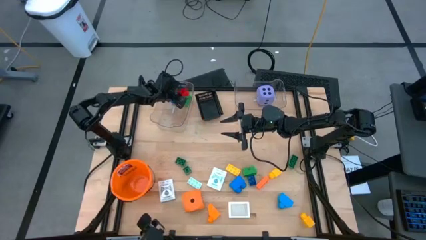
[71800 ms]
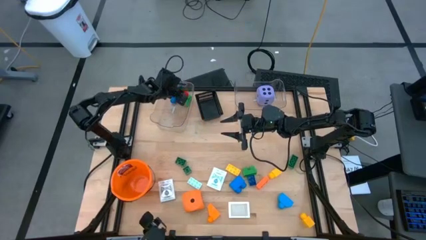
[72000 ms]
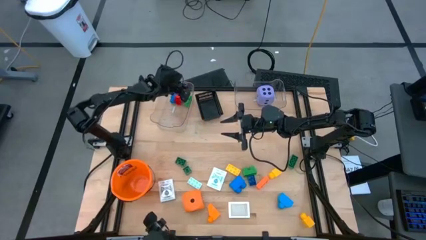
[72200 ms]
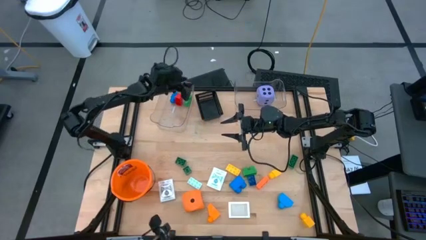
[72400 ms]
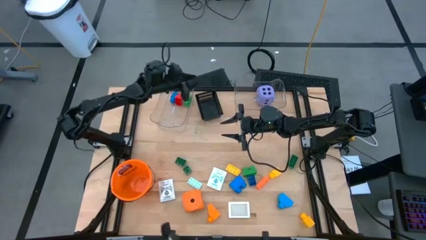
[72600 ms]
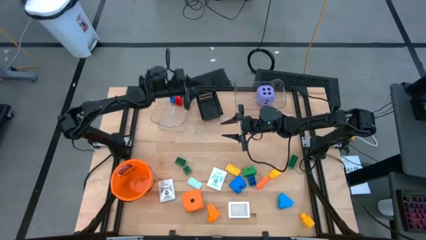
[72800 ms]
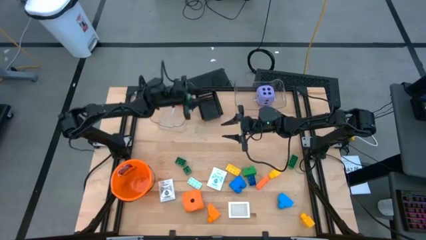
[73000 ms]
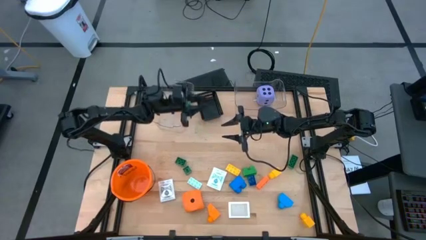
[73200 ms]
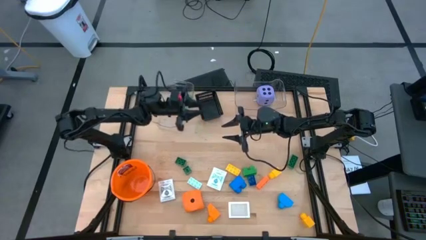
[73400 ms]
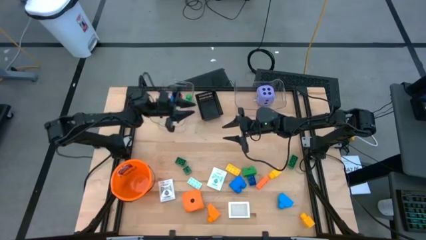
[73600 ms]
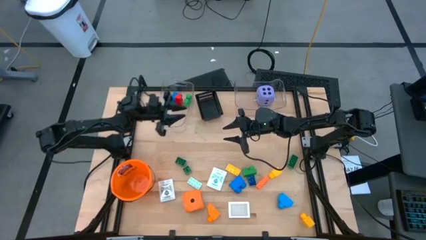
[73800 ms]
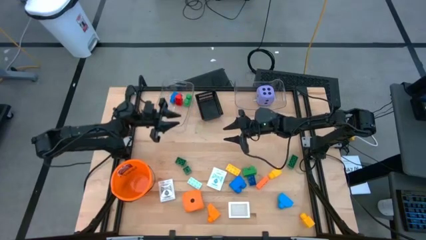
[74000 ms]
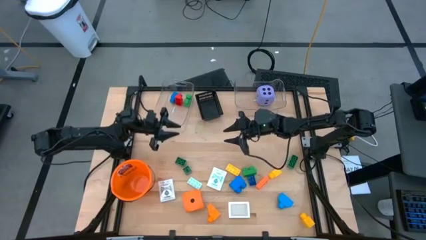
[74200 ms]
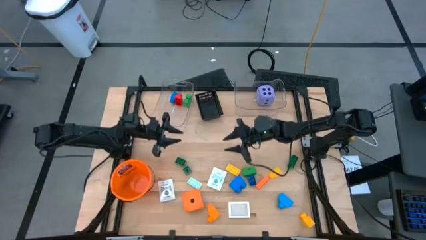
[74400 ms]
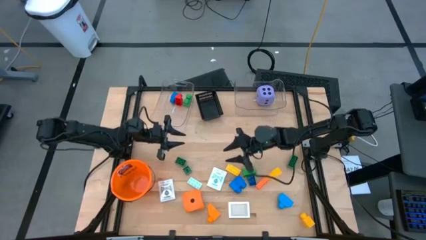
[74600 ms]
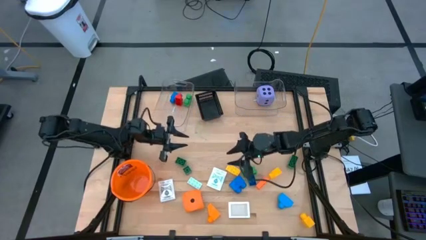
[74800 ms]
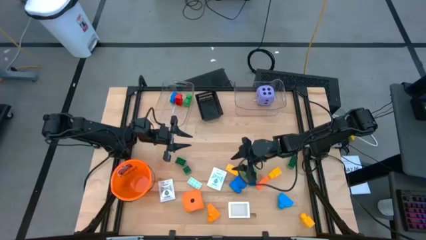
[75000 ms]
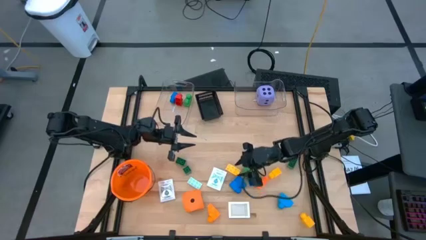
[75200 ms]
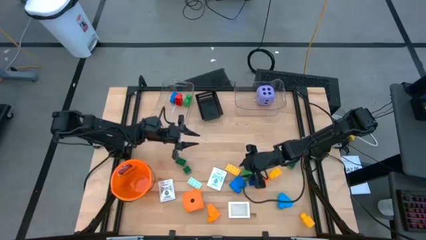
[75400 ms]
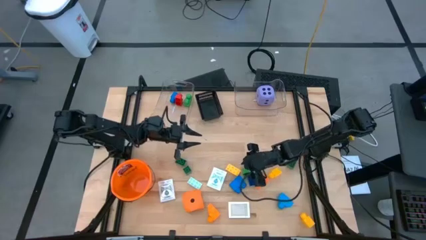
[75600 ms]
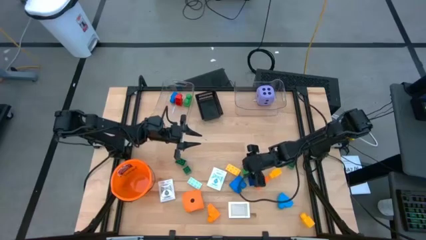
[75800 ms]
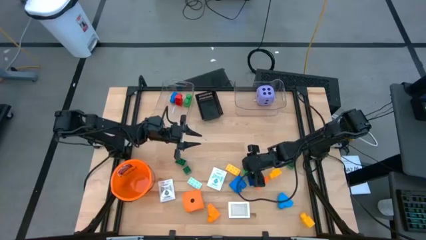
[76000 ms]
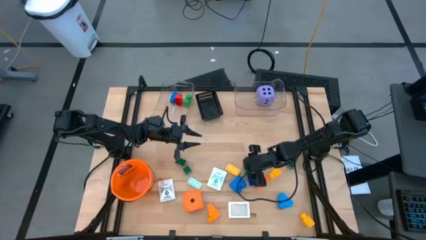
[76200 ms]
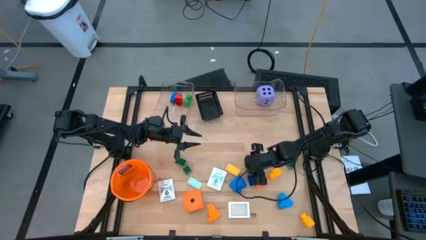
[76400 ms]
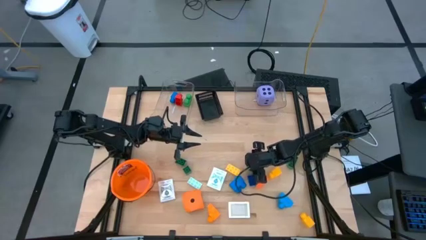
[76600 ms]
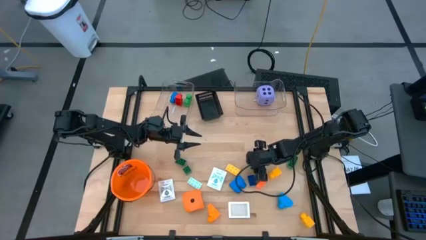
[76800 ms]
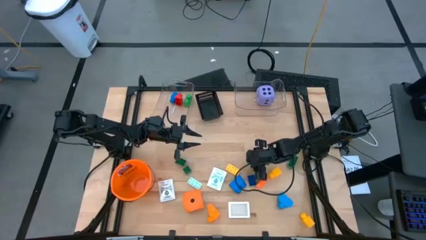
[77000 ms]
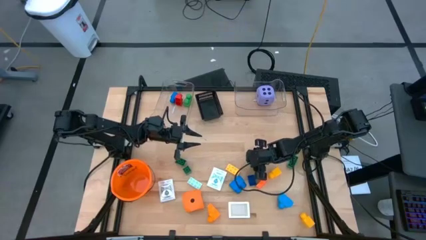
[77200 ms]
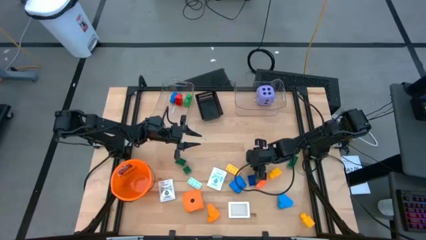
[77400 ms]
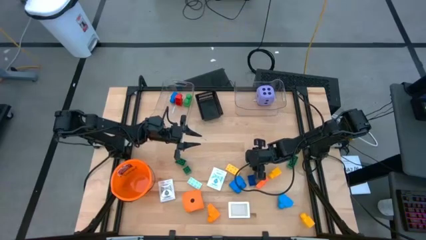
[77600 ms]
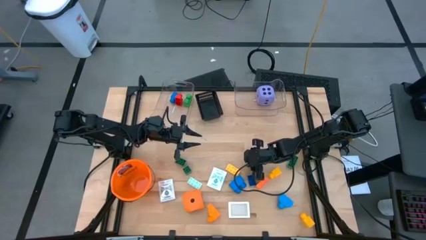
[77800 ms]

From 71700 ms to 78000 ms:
Task: Pick & Place Toys
Put the green gamepiece into the left transparent bin

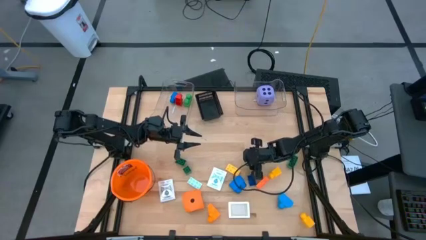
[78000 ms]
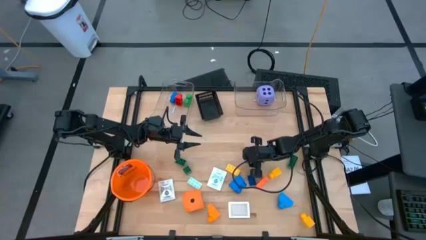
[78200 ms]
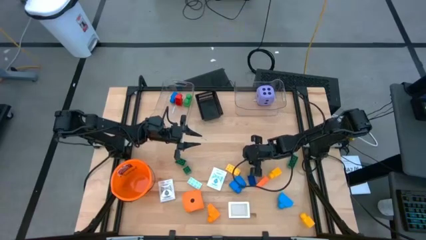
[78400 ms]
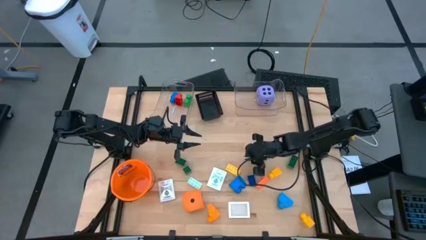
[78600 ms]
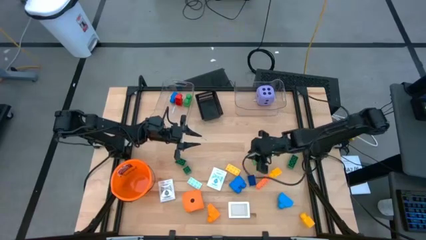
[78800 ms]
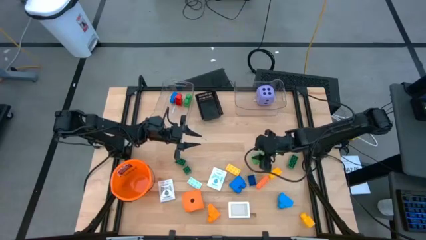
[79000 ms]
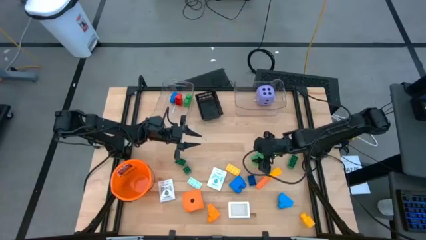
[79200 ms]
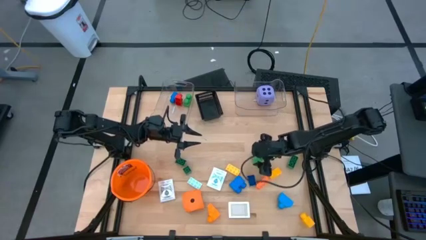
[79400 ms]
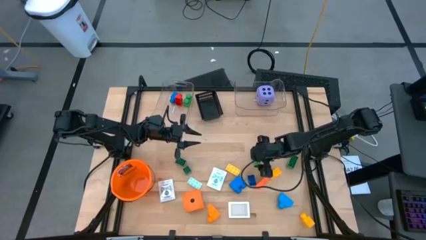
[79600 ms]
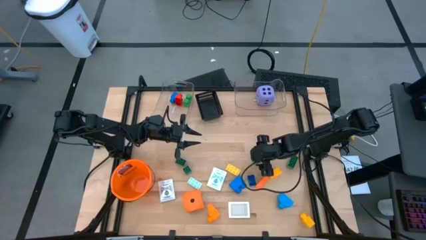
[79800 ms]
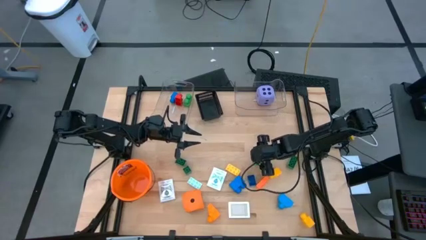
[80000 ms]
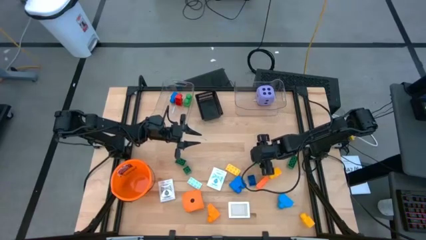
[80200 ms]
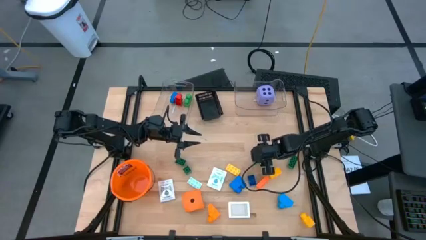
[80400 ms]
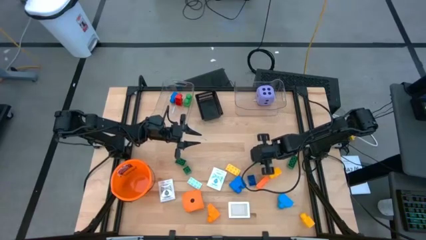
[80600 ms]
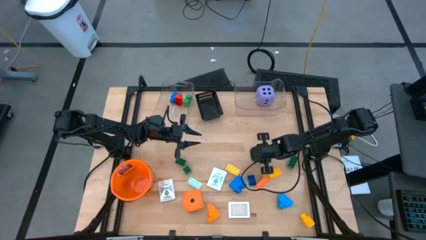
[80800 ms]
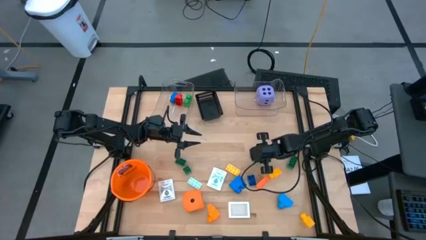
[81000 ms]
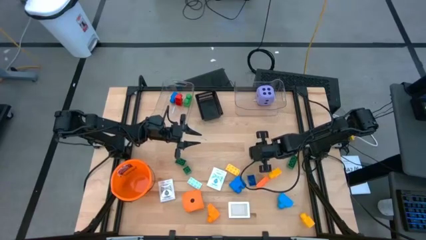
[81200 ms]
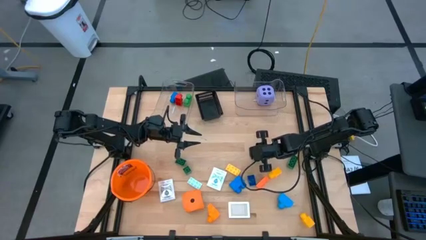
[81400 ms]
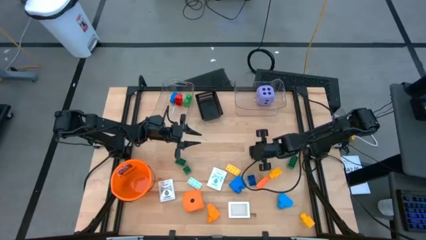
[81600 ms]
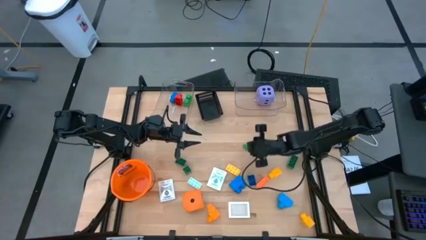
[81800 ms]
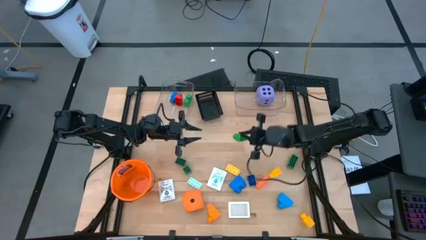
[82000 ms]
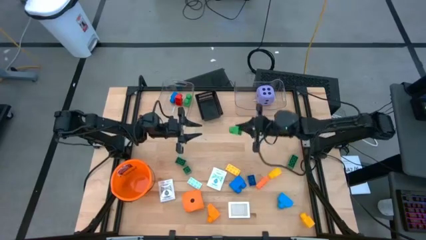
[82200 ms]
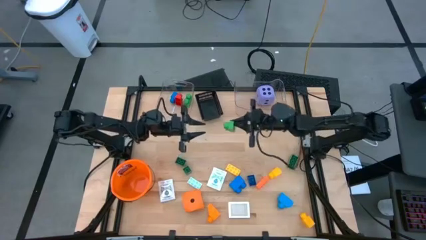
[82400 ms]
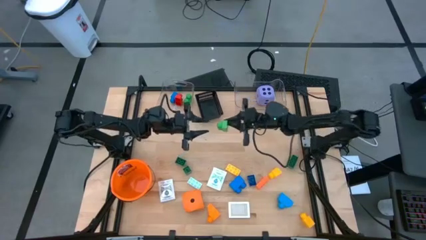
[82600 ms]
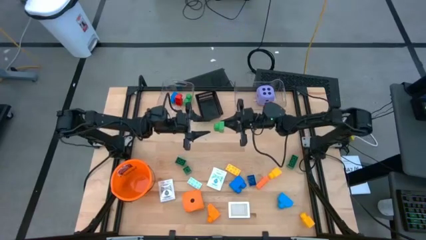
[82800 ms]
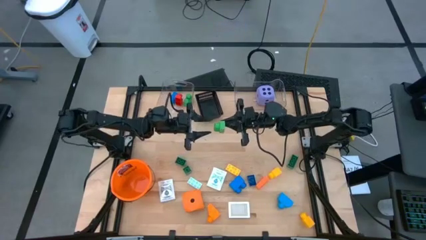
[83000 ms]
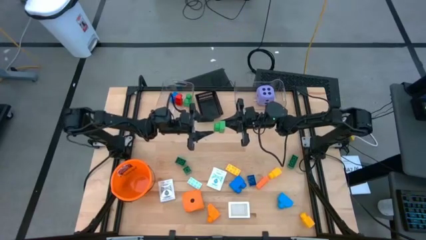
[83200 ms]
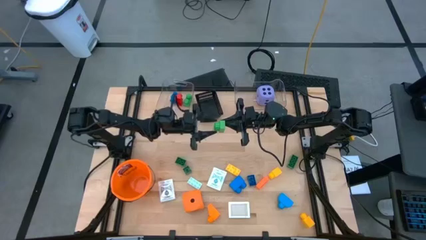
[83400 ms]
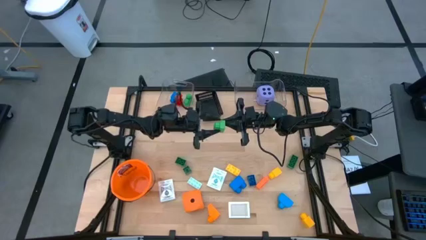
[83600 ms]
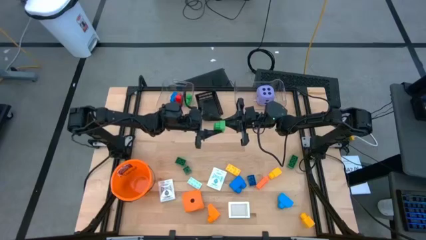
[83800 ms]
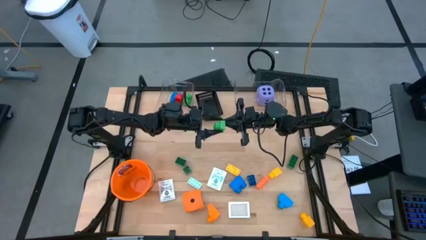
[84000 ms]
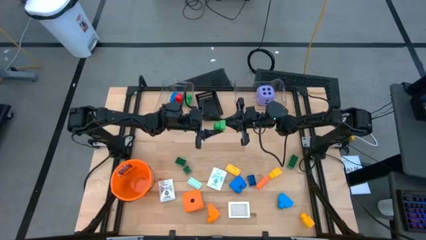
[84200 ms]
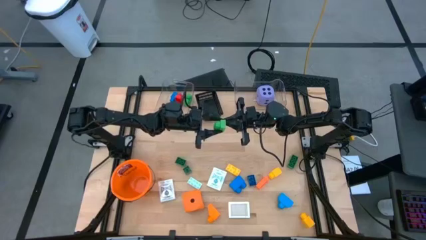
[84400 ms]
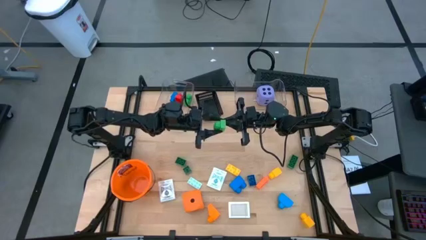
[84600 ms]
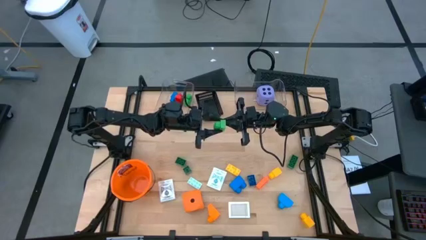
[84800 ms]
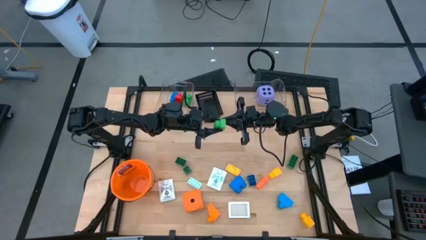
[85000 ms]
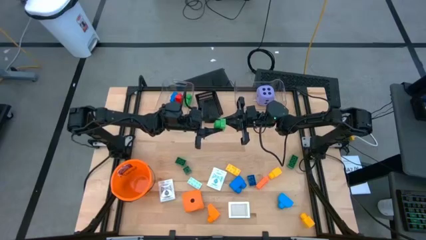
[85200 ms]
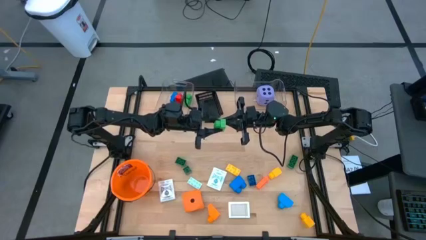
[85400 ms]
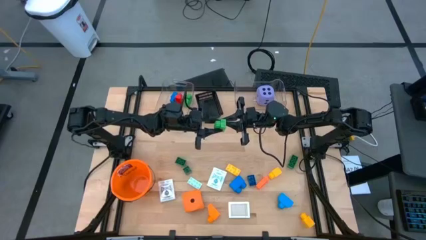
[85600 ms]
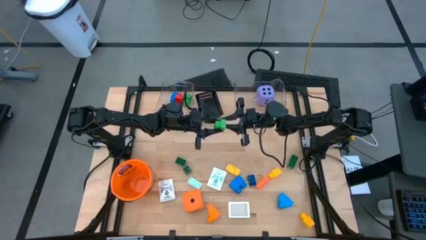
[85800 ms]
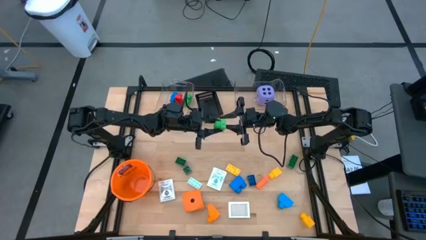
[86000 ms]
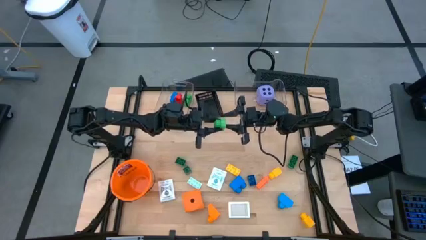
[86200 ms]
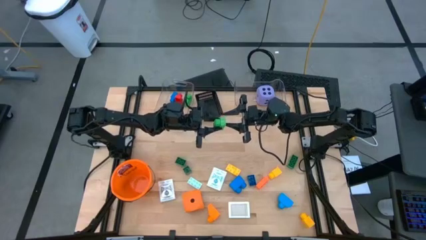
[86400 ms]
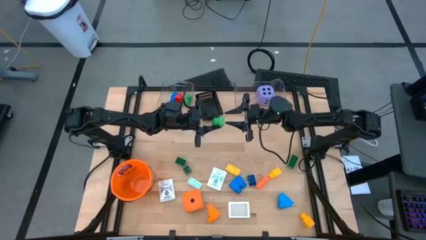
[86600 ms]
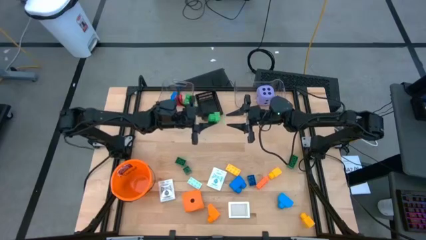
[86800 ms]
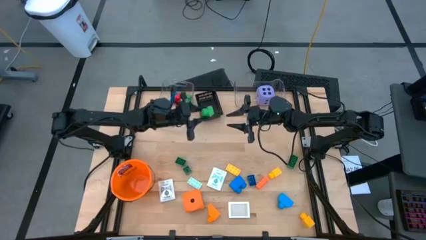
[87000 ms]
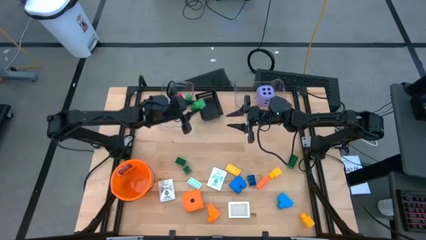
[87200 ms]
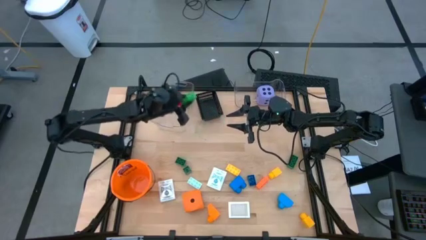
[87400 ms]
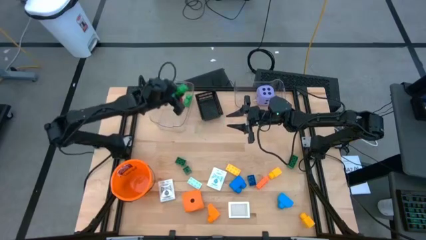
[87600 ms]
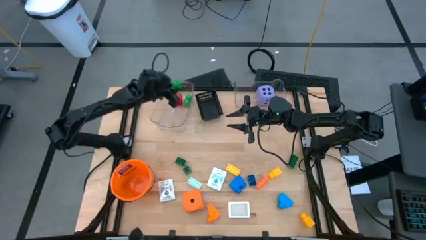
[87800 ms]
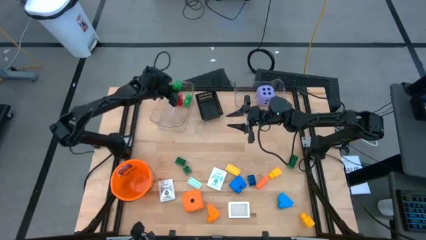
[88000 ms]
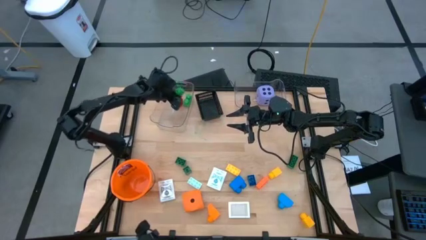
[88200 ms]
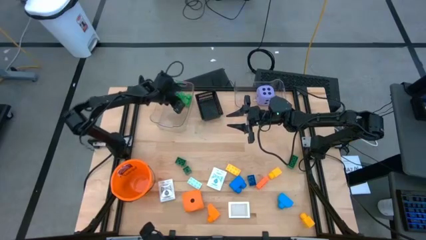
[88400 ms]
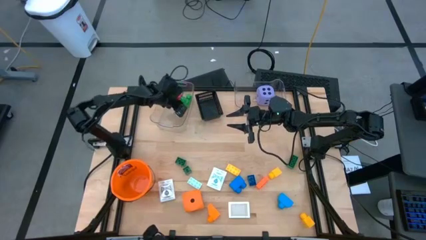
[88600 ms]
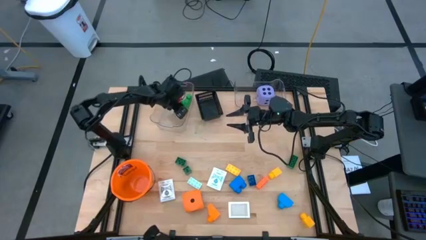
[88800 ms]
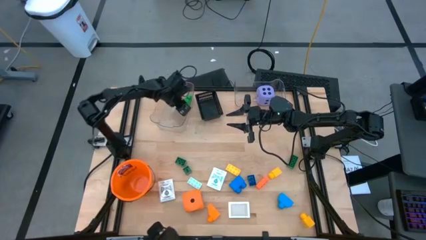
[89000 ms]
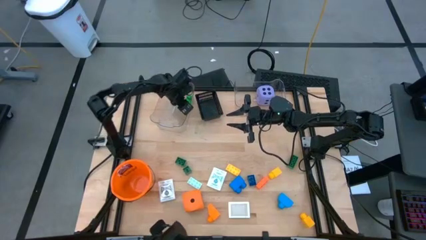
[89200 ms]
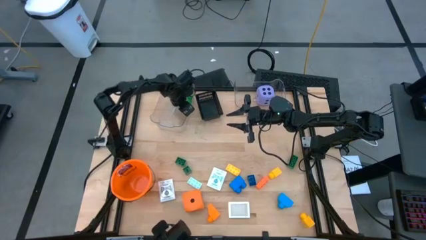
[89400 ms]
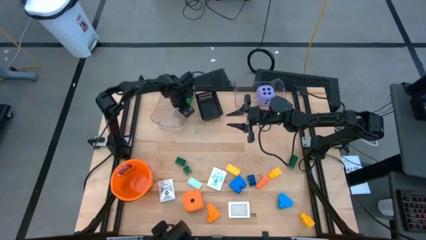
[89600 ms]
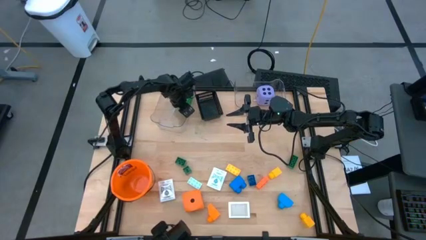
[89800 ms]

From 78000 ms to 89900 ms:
Put the green gamepiece into the left transparent bin
